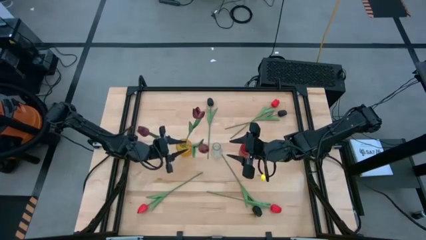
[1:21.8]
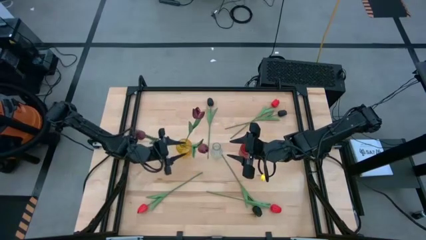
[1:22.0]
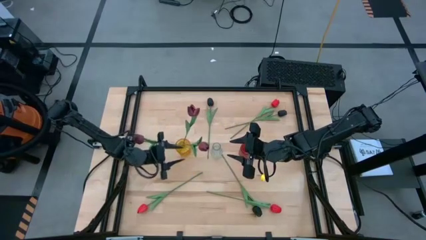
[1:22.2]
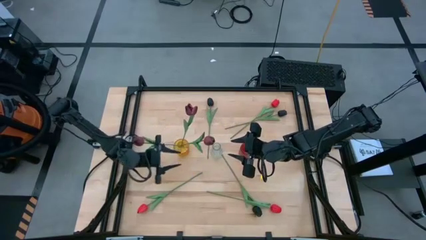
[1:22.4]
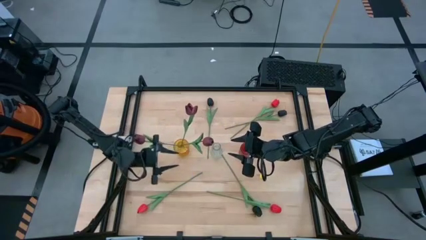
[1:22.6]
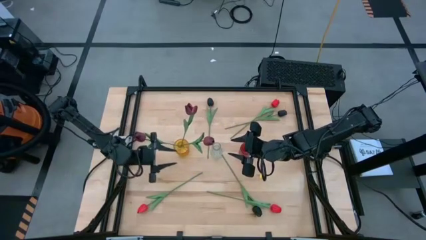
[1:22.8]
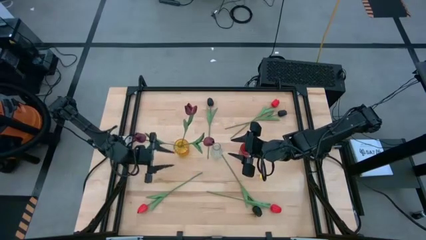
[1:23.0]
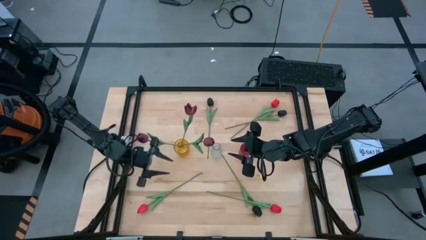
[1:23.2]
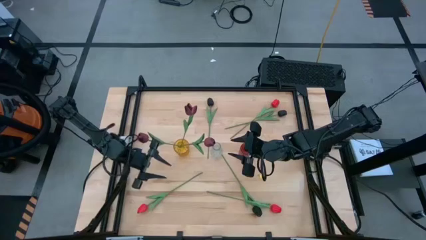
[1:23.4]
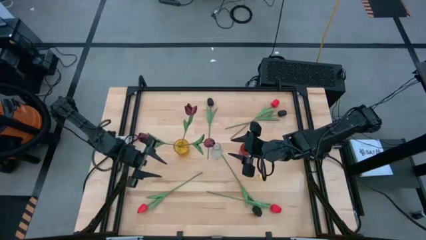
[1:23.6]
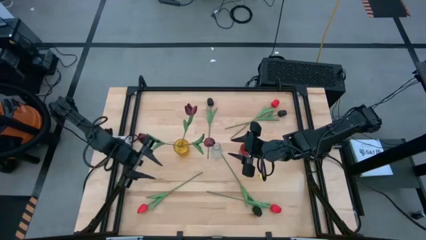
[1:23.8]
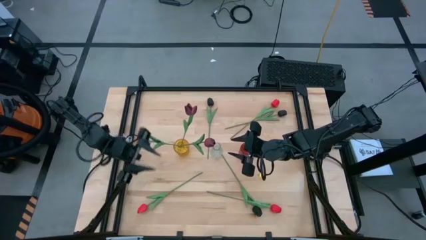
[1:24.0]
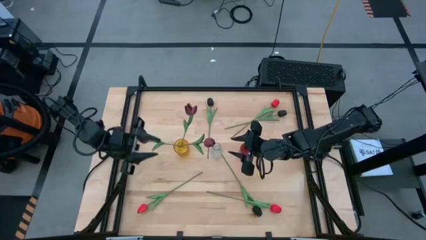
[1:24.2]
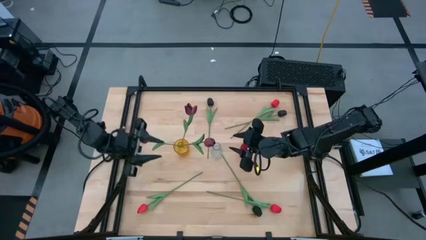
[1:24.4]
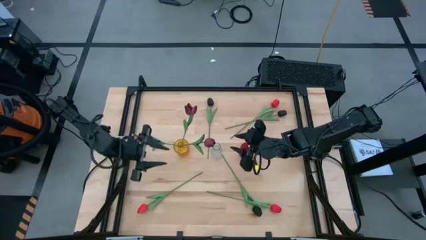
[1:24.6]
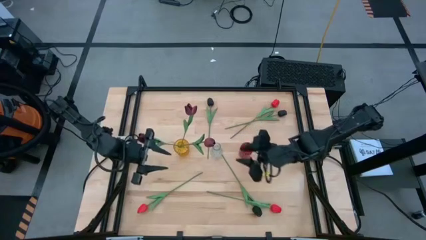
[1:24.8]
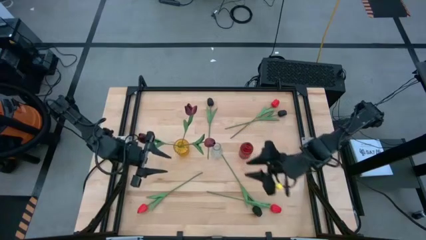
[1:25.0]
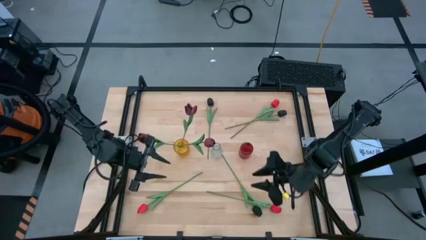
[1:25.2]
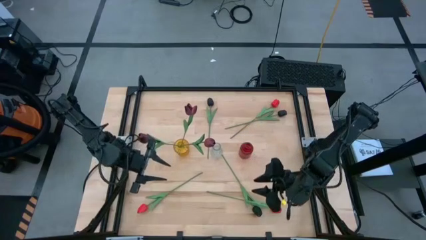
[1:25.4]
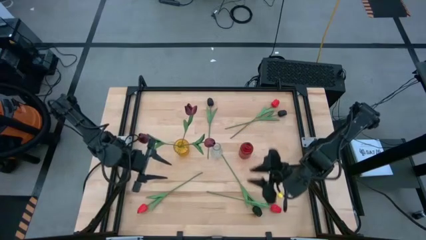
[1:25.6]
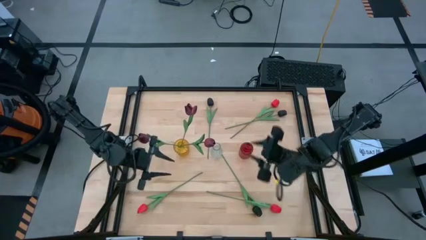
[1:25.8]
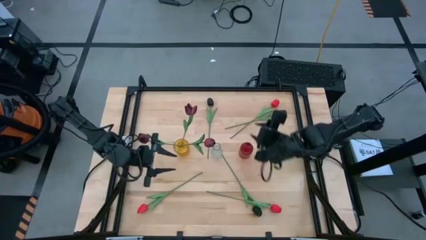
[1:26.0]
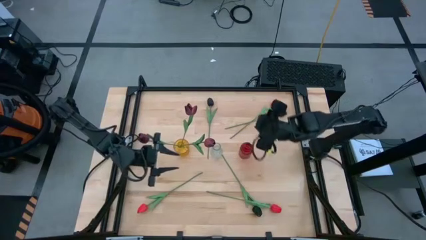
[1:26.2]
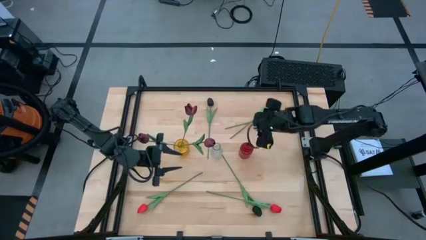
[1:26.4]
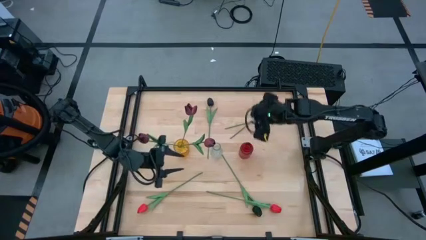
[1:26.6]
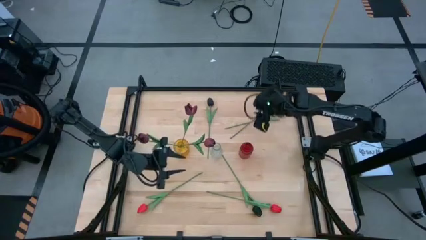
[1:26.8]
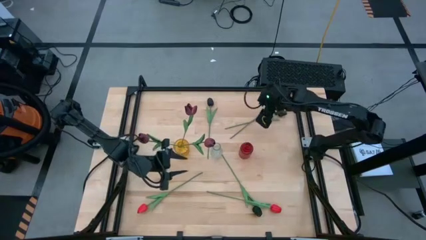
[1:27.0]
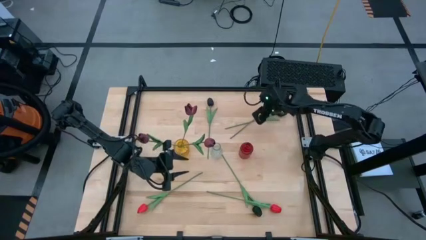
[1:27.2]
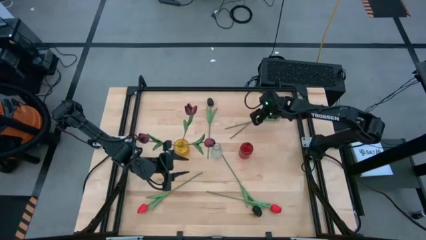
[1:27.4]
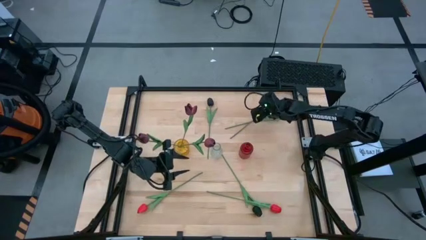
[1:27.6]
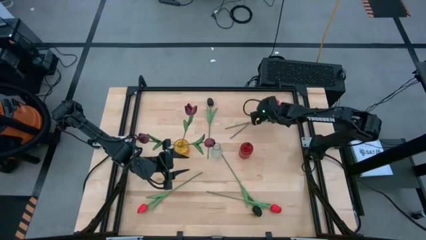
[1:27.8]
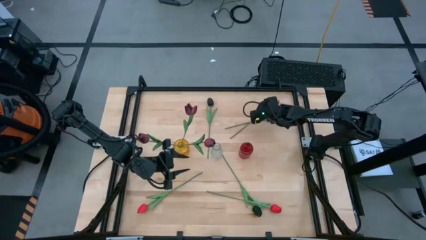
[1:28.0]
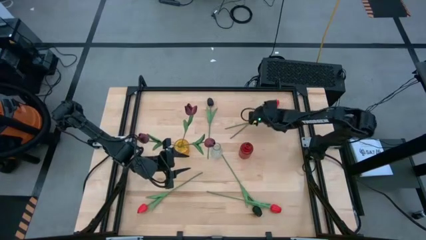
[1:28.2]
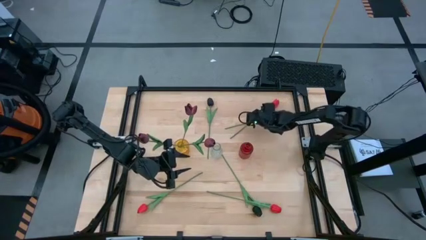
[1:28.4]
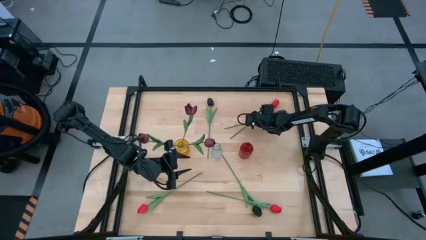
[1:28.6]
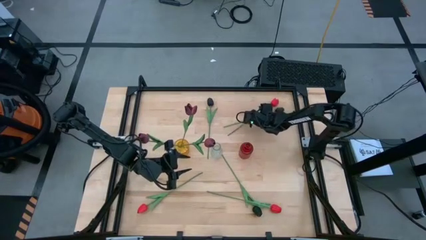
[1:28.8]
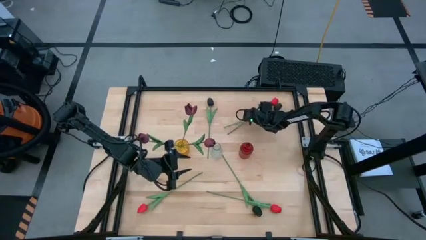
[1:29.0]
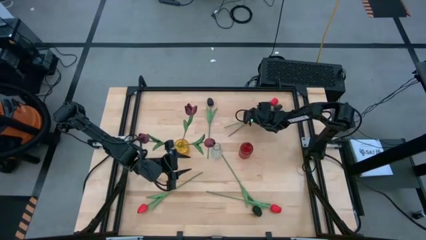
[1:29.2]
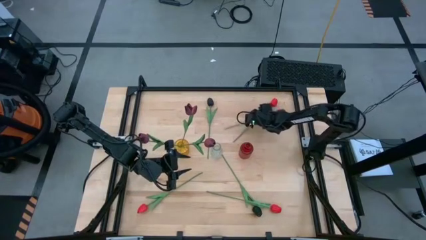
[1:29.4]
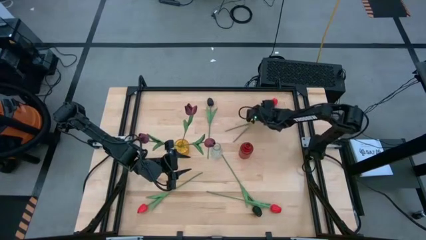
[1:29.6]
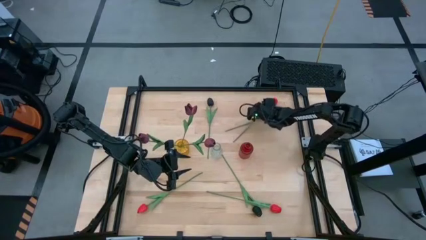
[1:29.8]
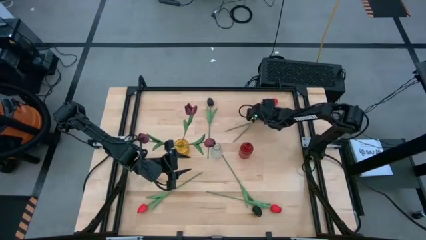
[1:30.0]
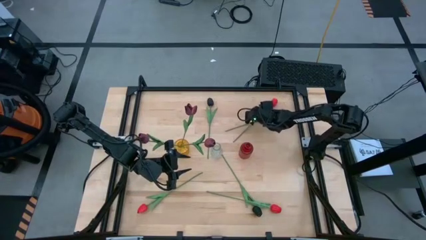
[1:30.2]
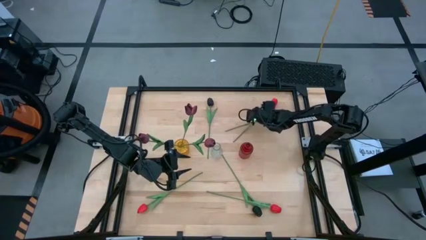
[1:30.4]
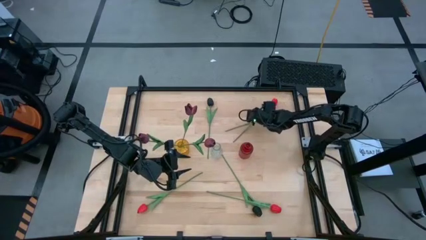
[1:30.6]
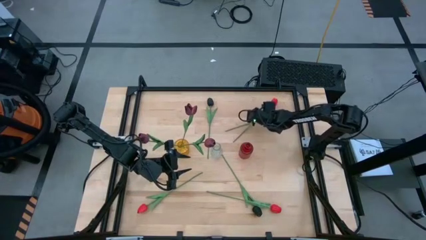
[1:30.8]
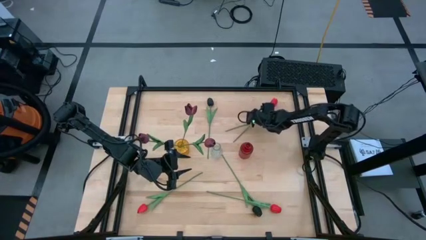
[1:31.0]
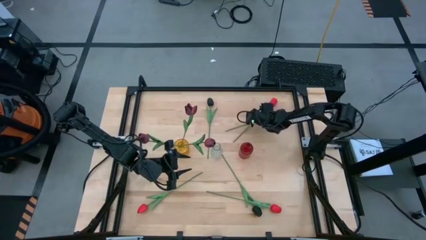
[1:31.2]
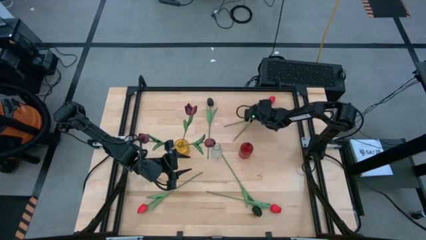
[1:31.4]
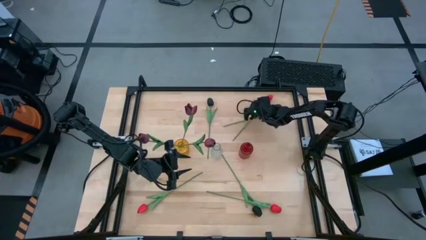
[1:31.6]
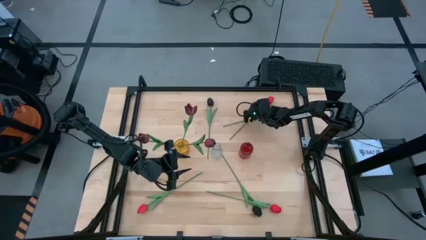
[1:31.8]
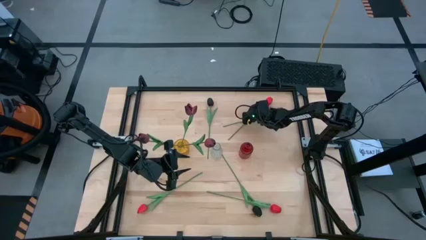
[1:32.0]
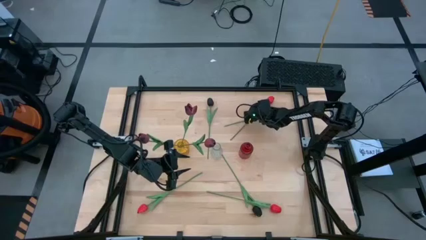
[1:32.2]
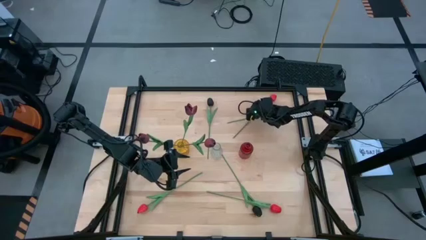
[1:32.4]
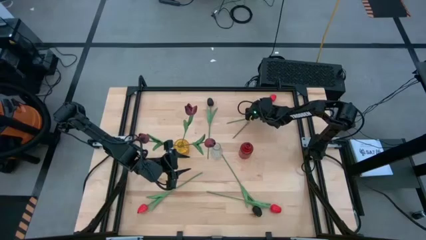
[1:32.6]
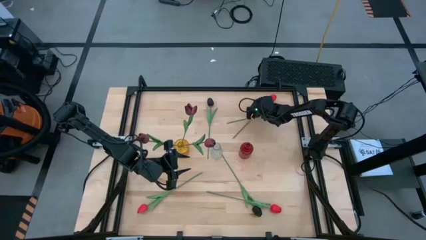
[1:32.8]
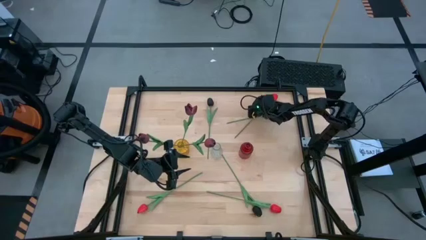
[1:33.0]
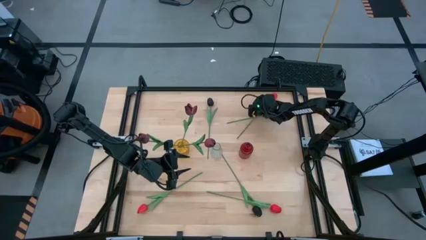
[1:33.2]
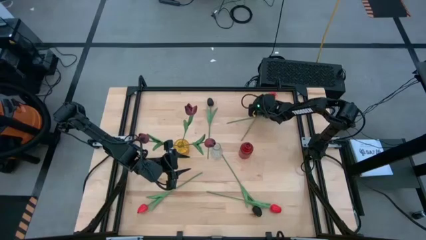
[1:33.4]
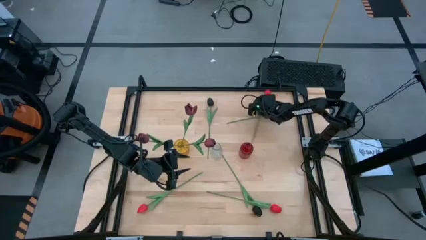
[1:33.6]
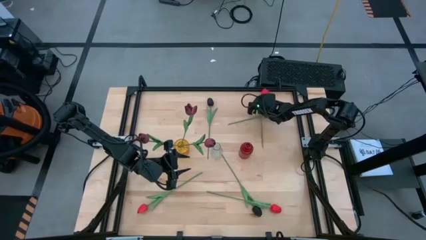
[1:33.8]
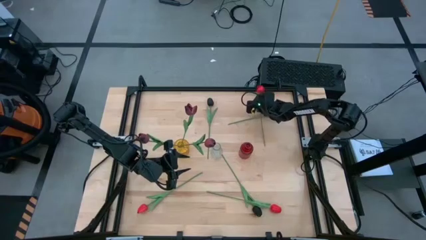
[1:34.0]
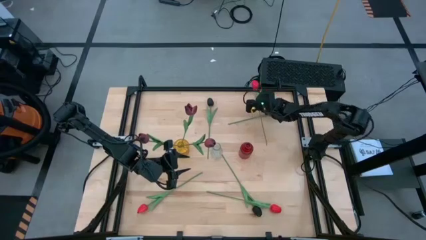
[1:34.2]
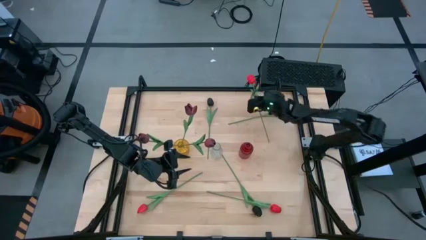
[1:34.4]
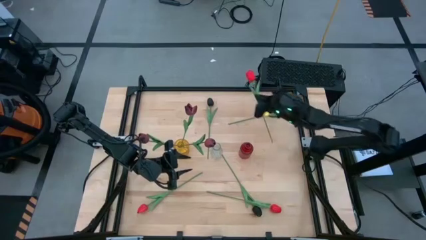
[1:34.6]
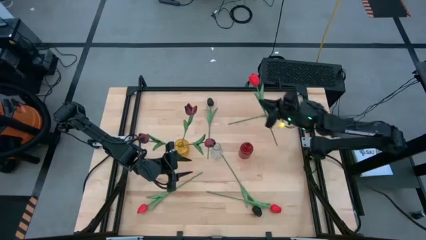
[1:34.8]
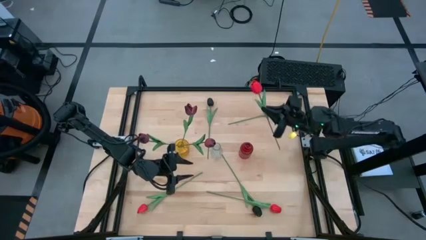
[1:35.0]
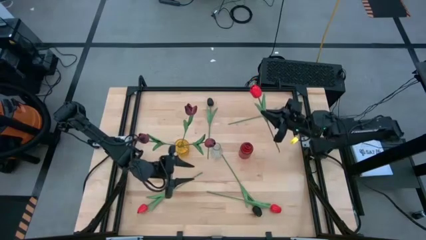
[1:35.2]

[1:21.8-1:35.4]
Task: Sort flowers into vase by color
Put the top pink tulip into the transparent vase
